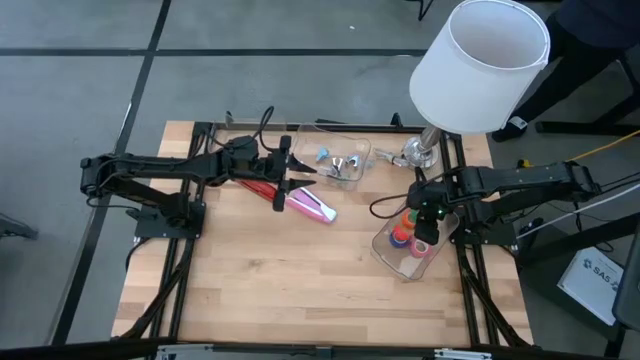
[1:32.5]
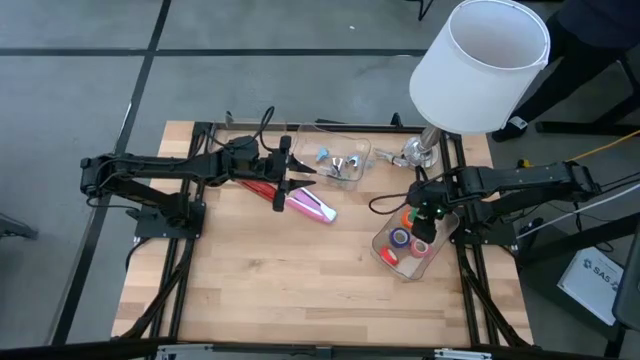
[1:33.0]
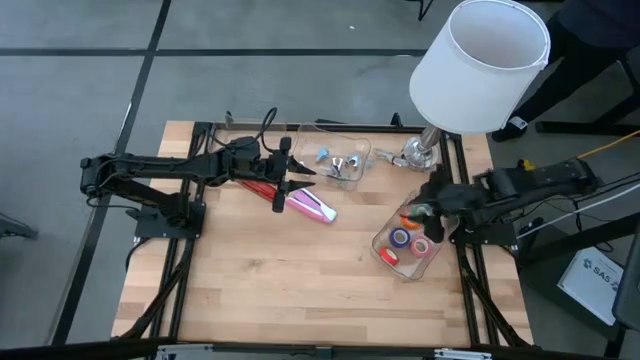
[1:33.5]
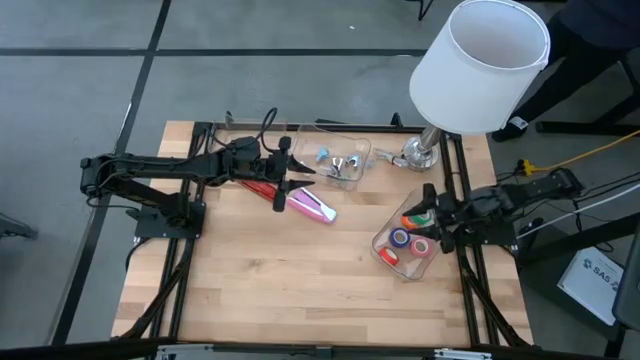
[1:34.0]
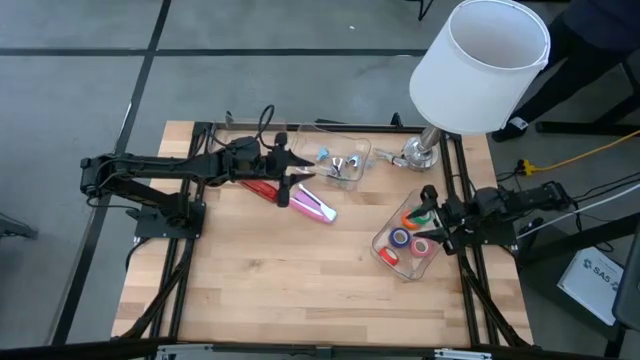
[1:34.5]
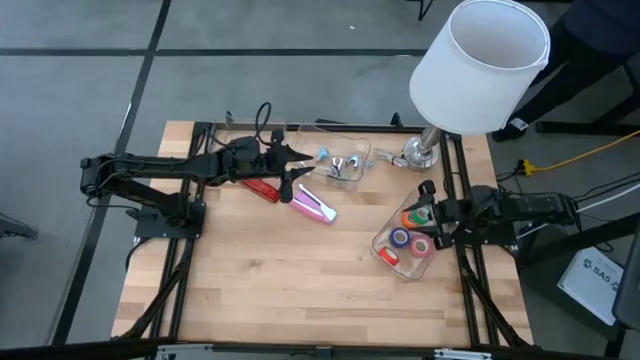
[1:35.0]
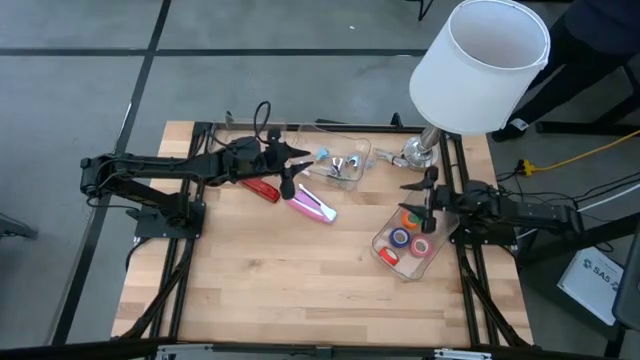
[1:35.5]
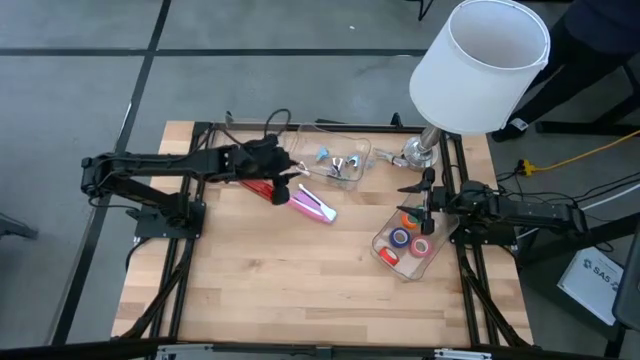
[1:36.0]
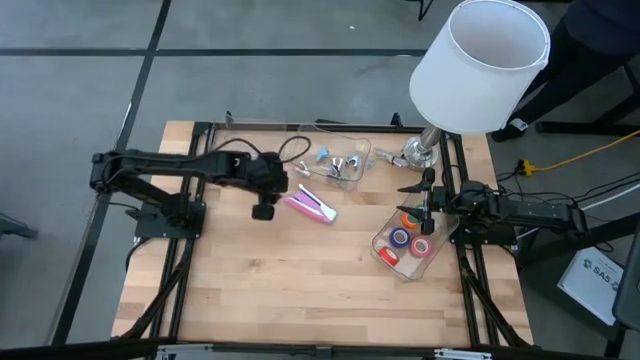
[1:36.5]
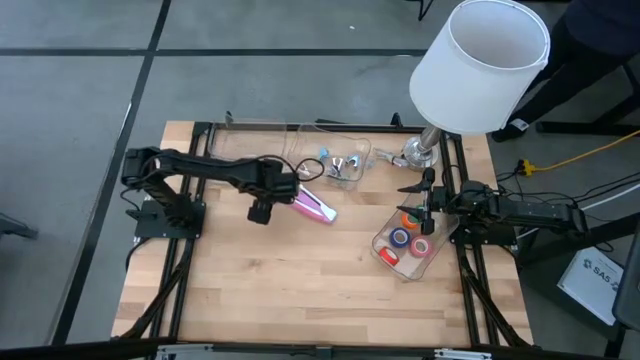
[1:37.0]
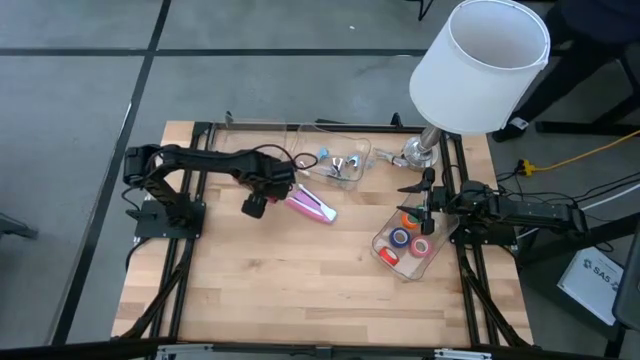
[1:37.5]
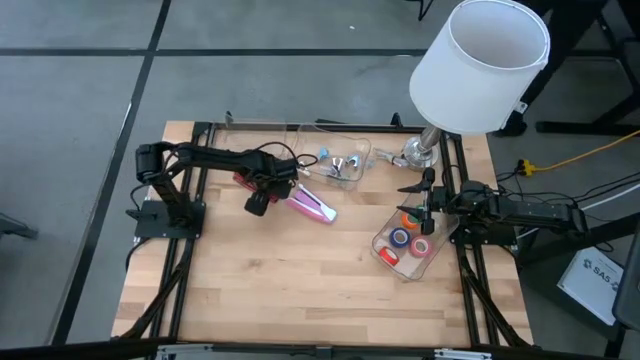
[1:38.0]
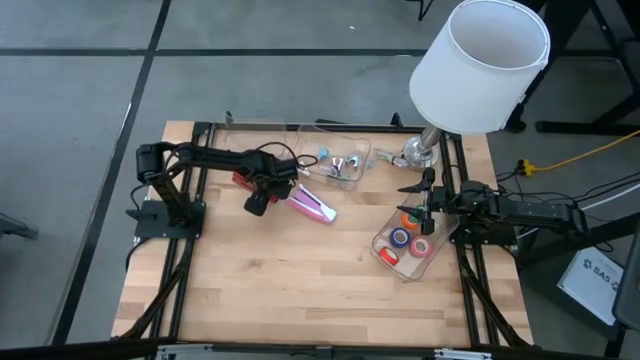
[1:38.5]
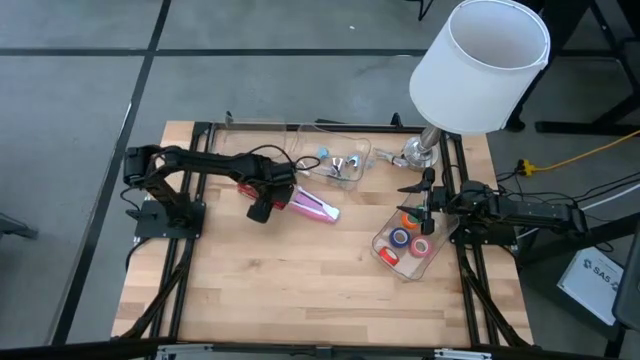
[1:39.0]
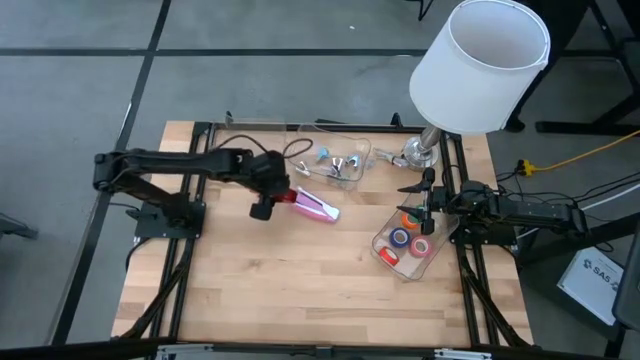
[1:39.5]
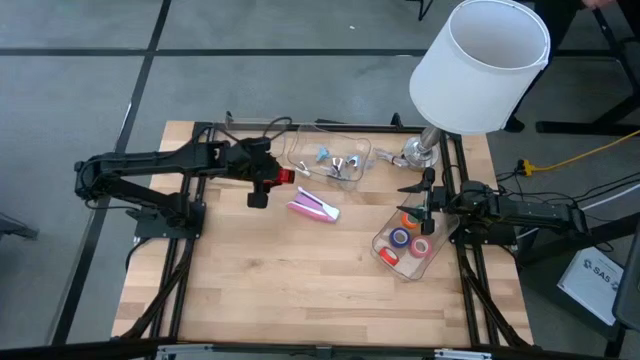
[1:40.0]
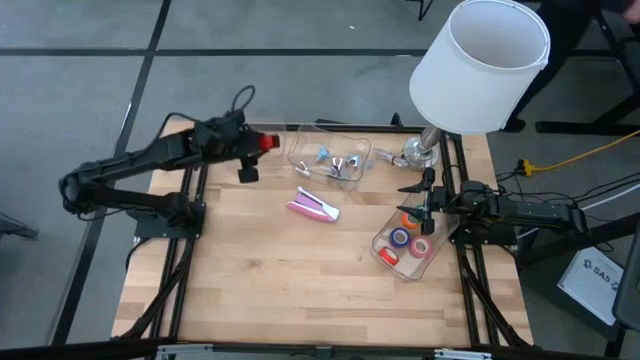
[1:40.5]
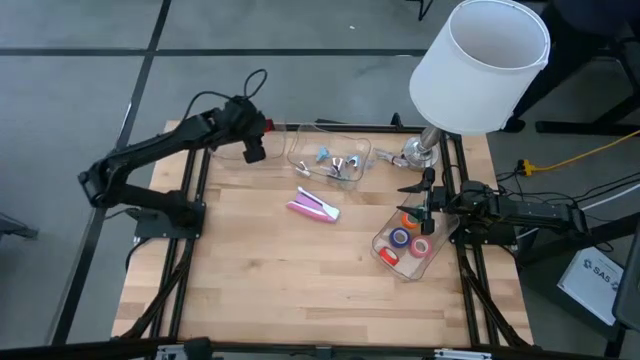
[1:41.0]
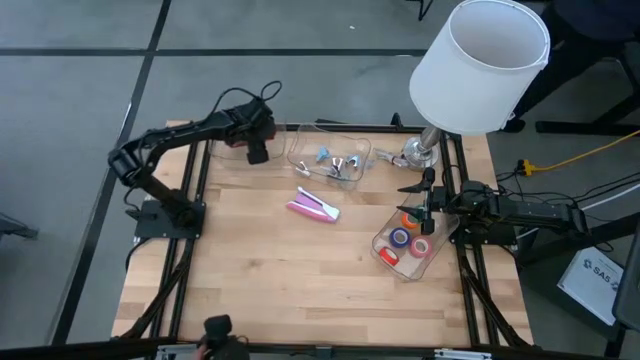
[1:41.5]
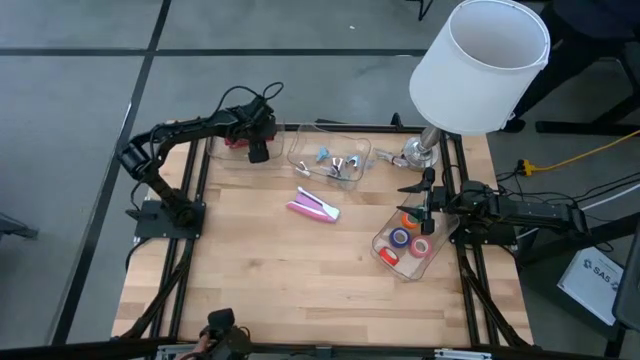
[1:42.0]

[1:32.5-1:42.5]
Task: Pick and place Stapler, Stapler remover, tape
Put the red stapler into the top left transparent bin

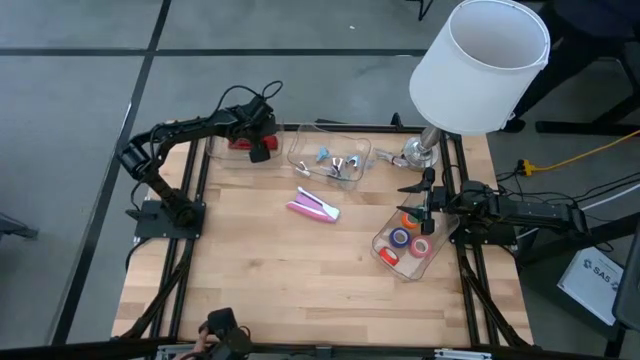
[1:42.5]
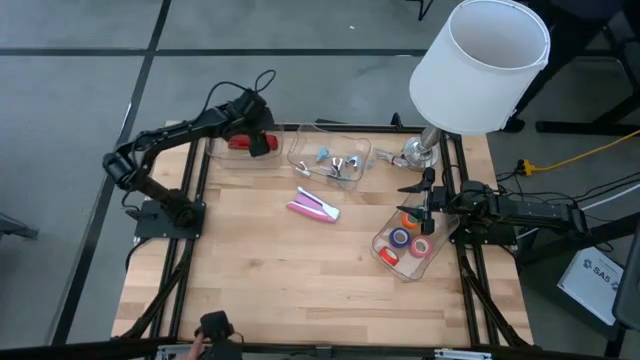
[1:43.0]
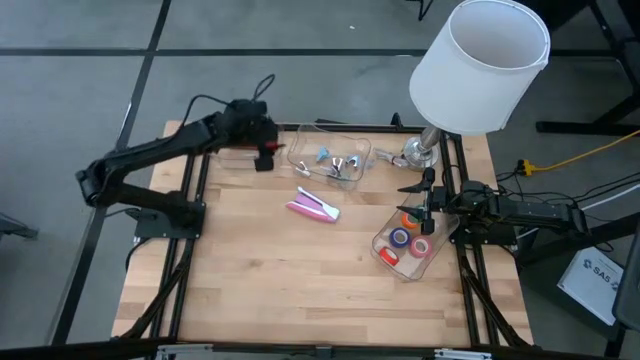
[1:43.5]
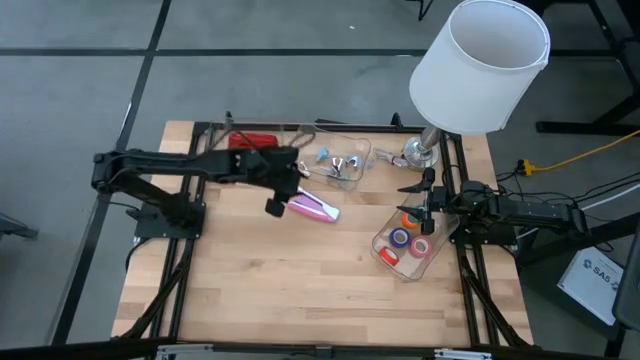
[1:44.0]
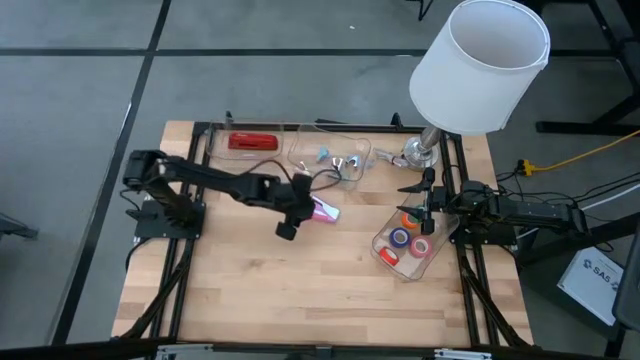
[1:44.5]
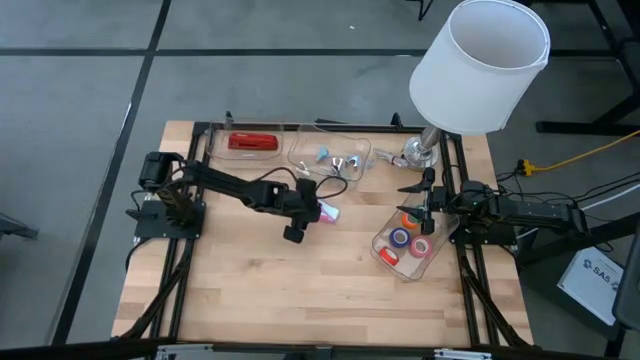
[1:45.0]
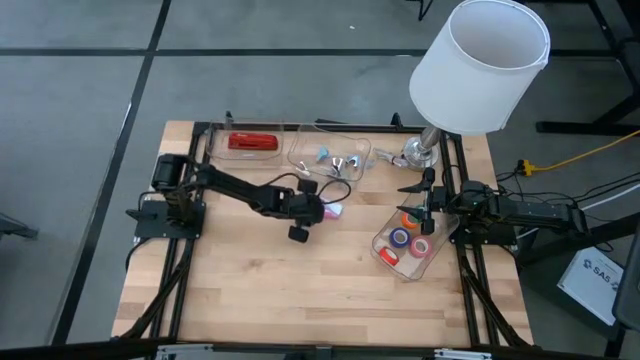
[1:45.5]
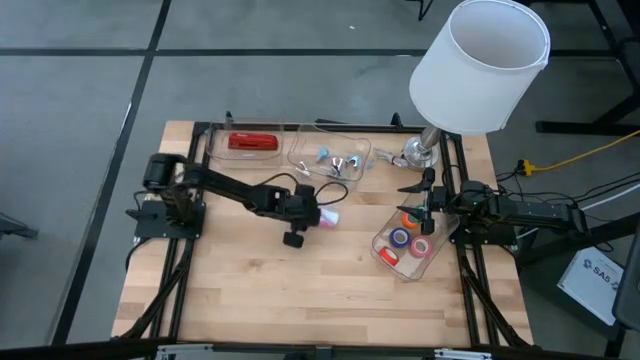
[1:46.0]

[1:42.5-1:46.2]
Put the pink stapler into the top left transparent bin

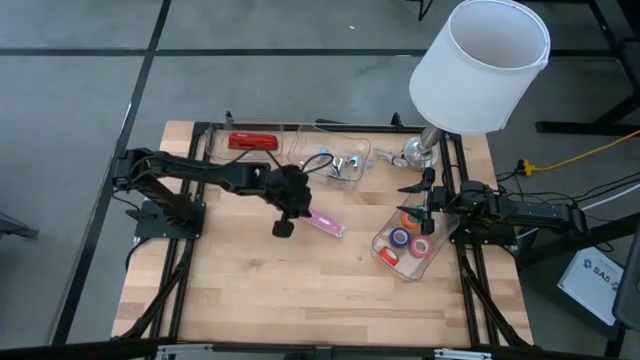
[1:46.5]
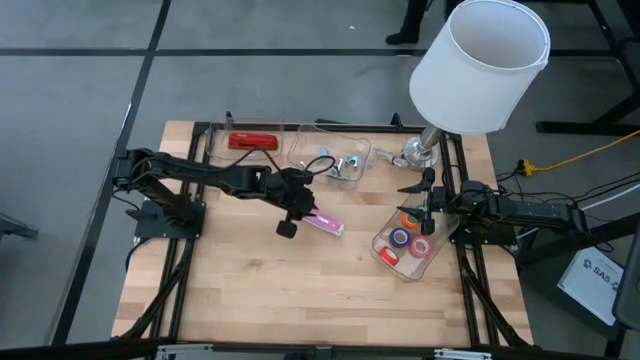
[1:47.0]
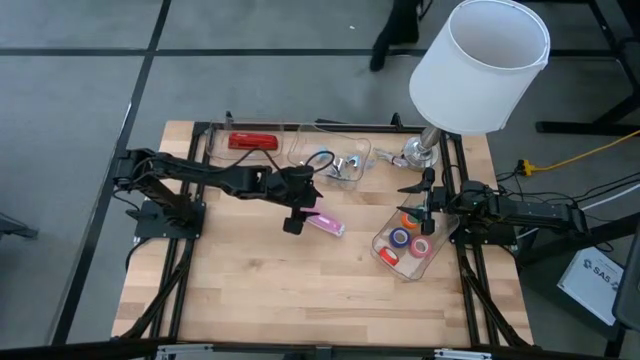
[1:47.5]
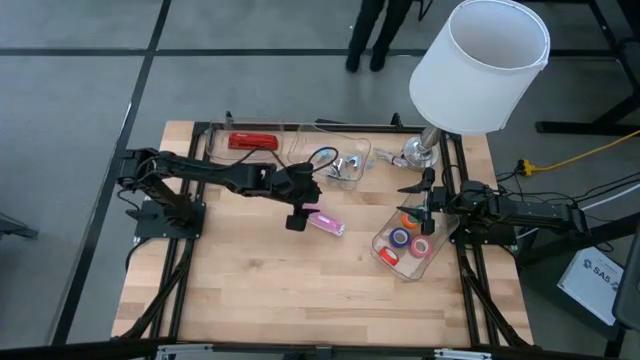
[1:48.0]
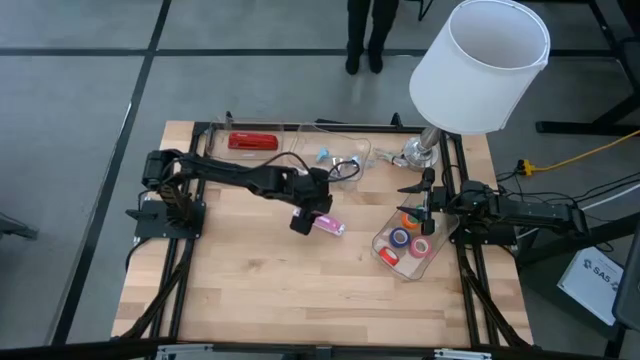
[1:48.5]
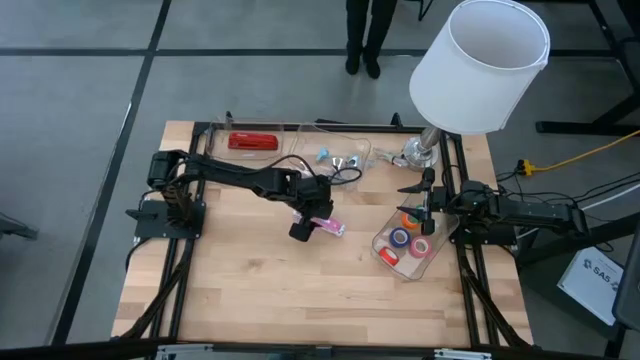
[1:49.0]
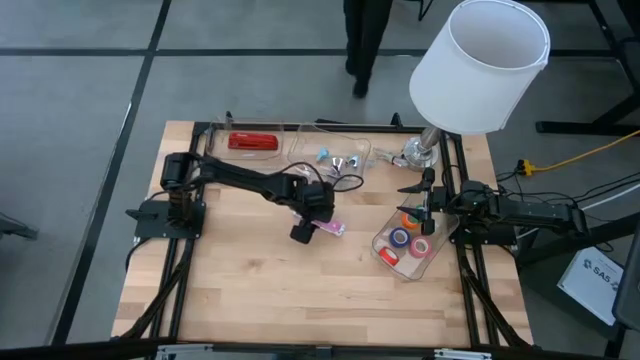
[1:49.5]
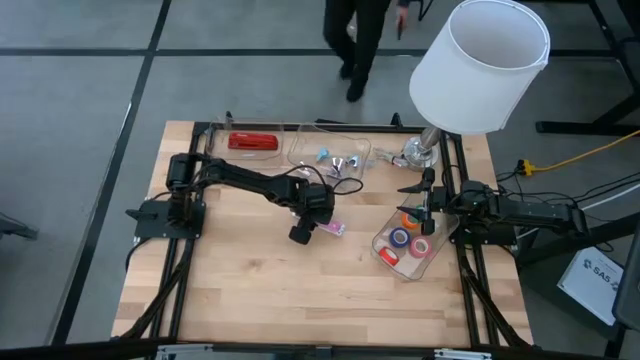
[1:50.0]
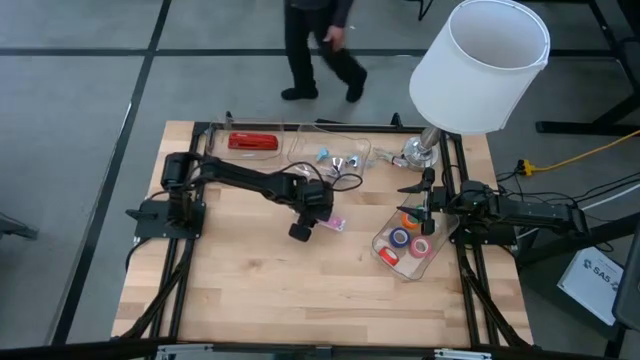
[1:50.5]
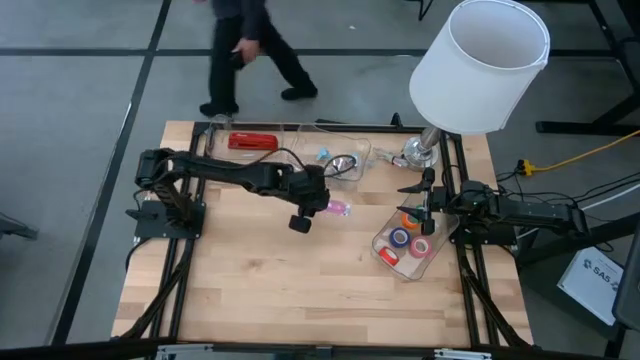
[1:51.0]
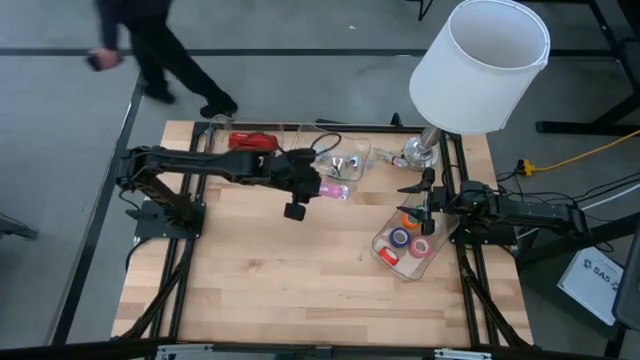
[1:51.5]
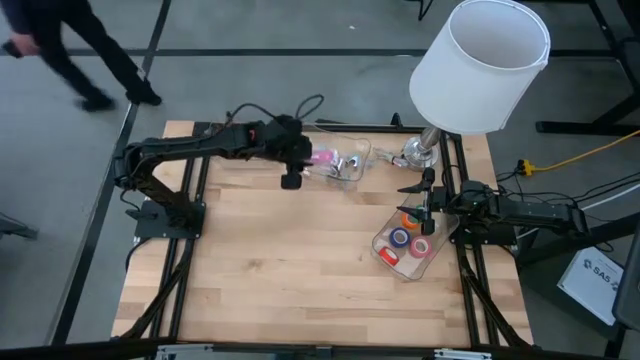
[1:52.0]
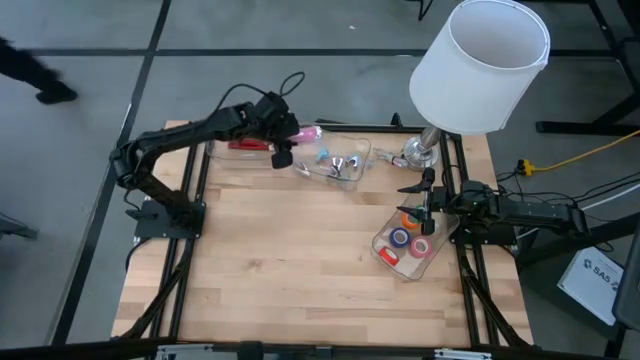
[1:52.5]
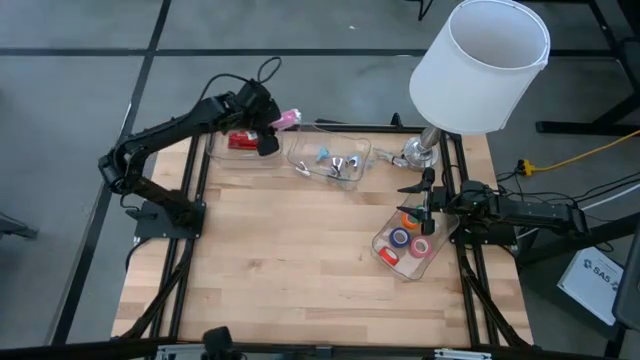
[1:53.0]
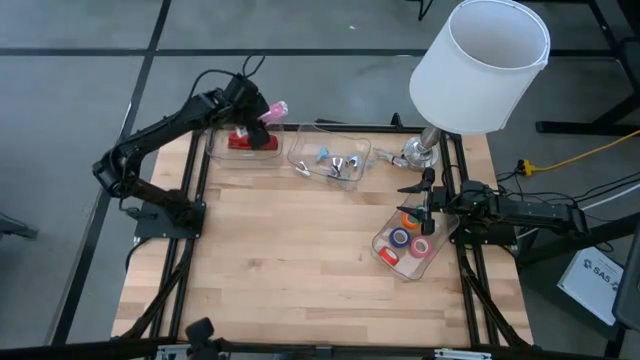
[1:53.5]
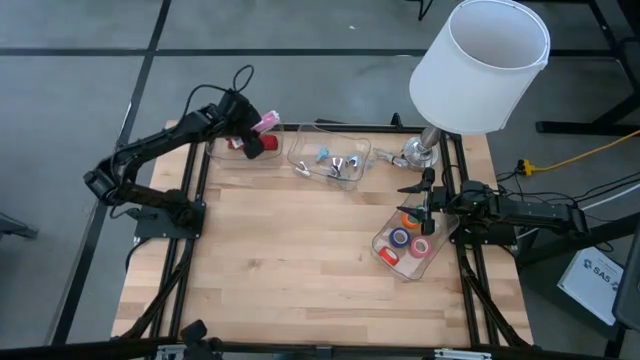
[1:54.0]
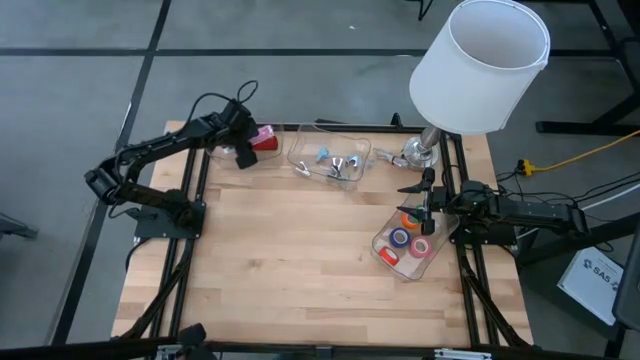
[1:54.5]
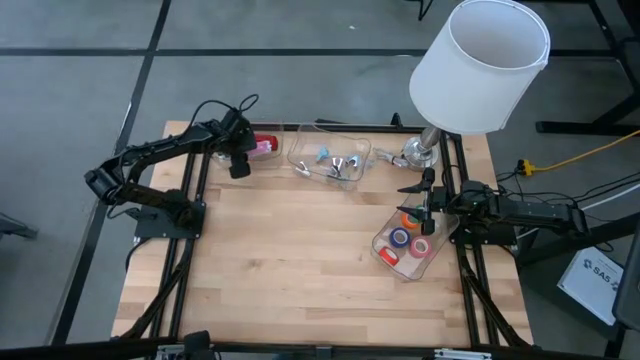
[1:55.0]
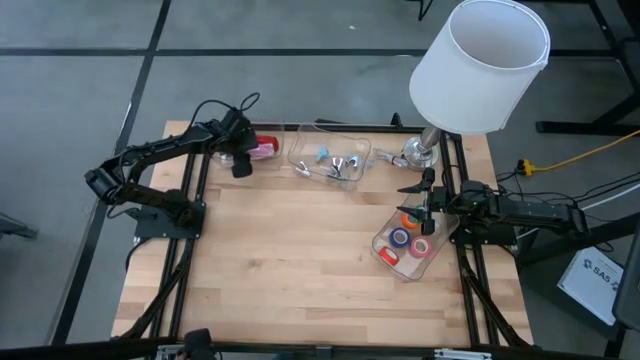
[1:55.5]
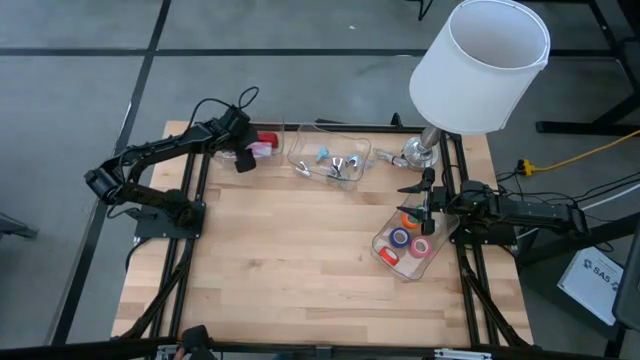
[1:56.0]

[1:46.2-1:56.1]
Put the pink stapler into the top left transparent bin
